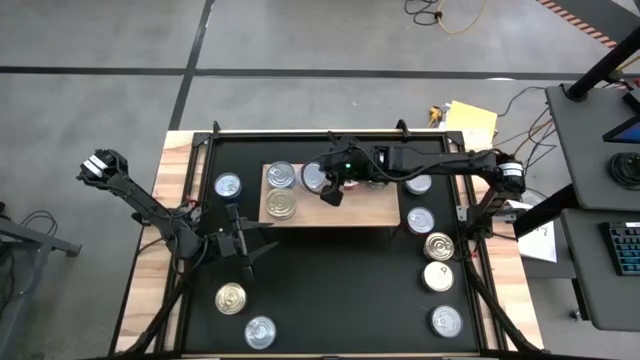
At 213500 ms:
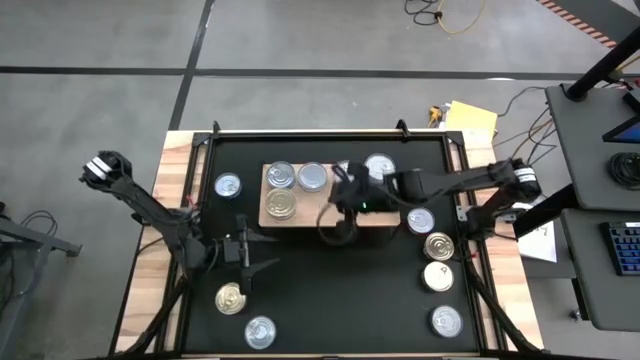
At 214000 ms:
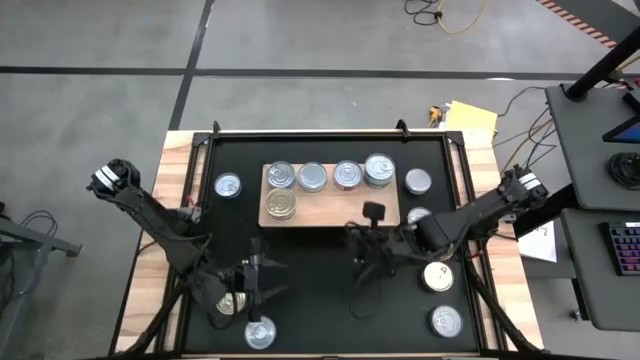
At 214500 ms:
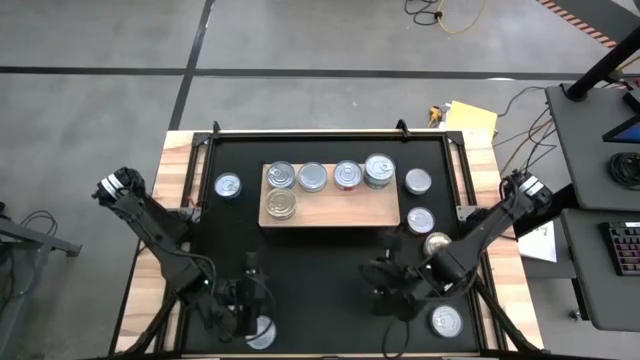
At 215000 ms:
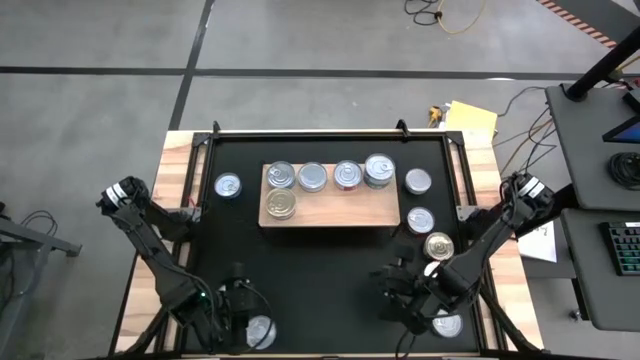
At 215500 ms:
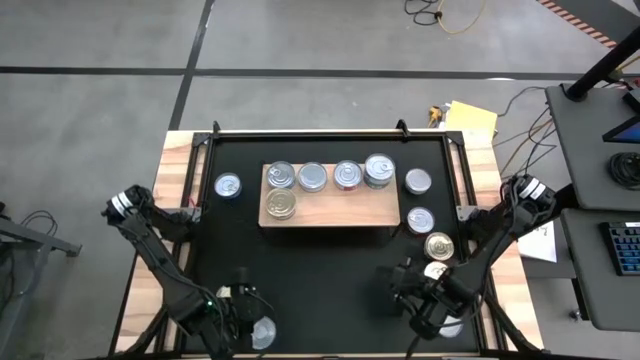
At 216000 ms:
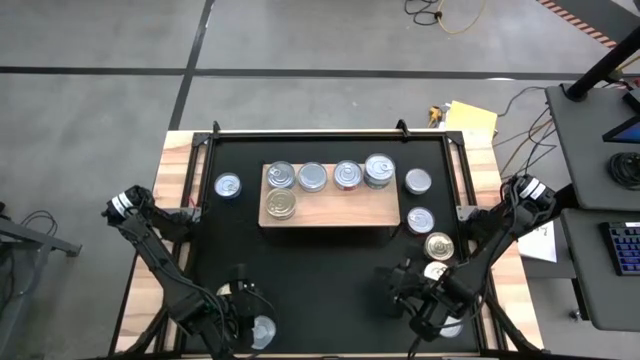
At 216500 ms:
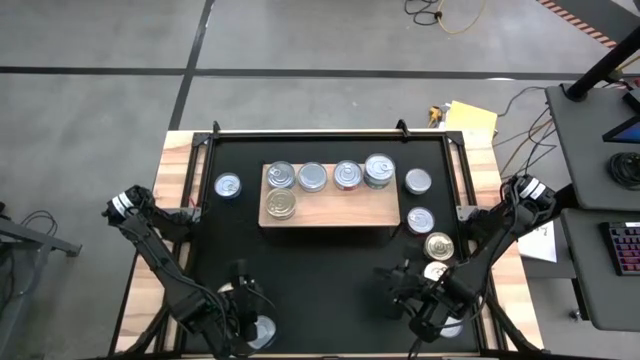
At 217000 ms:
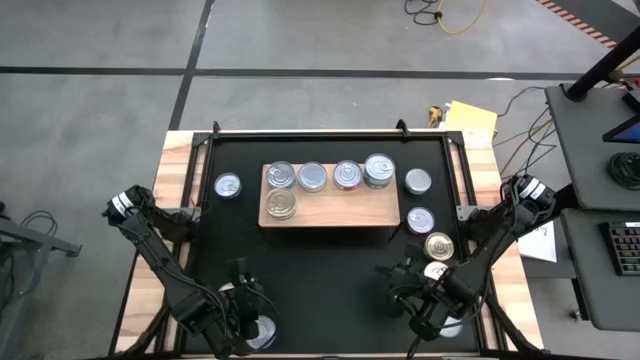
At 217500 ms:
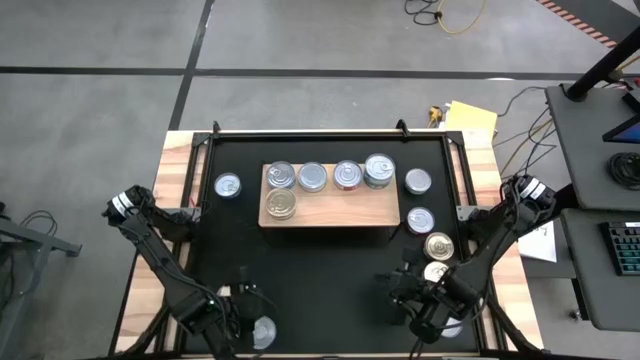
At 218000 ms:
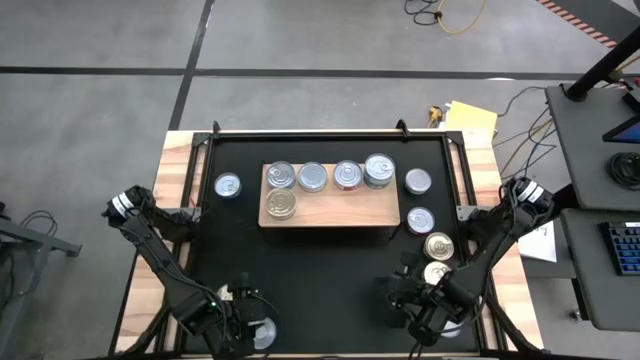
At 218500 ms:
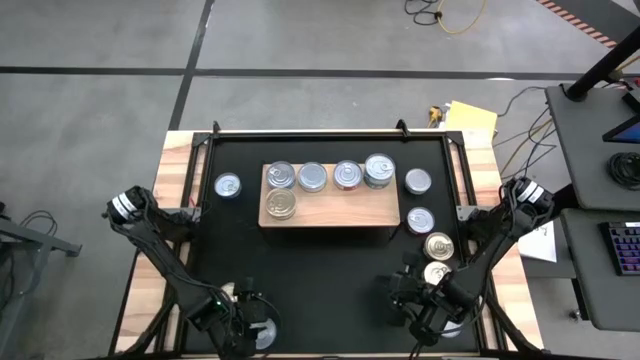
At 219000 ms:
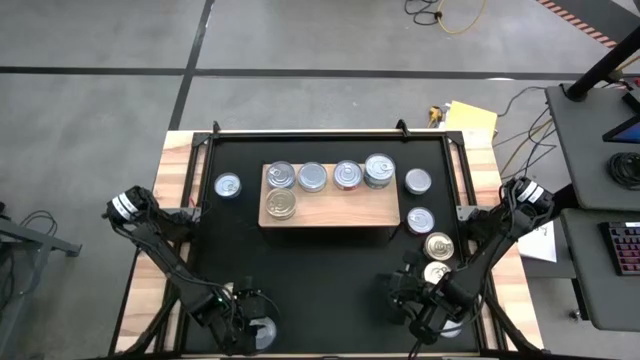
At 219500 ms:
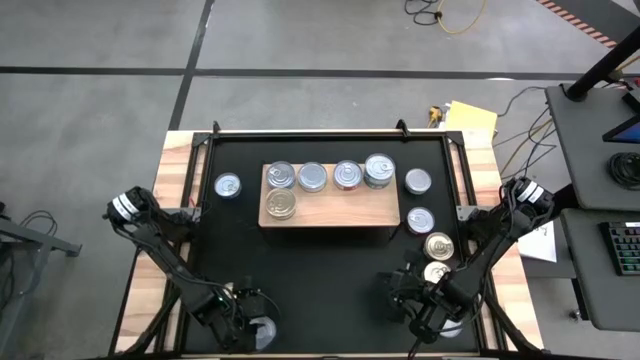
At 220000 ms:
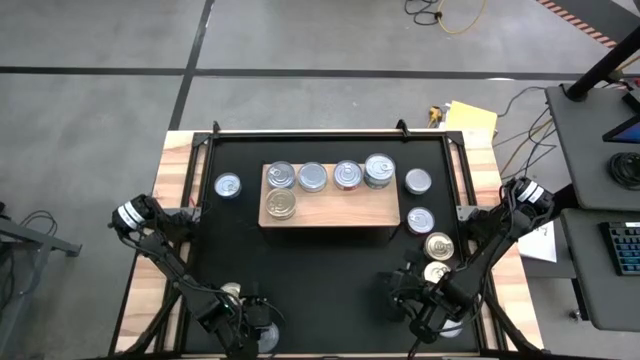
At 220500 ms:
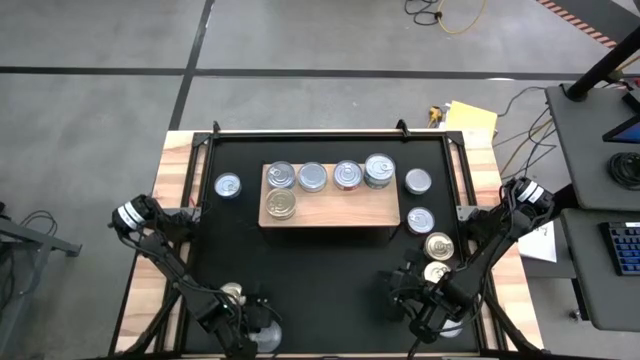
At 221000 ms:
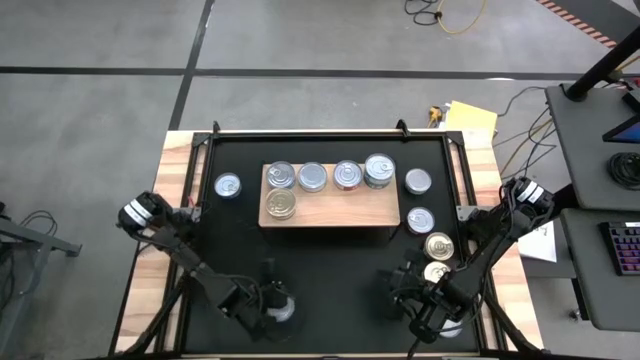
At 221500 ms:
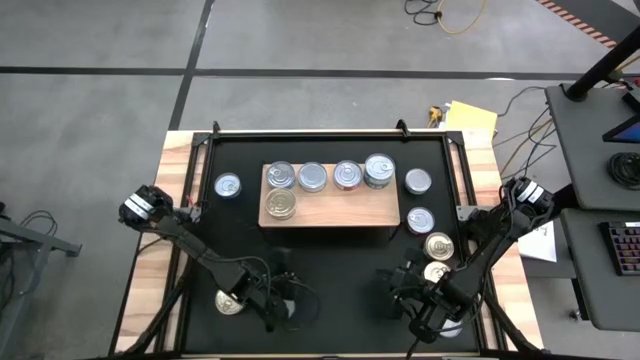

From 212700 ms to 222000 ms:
Task: Stack canned seafood by type on shelf
Put the green tuna can on the shelf

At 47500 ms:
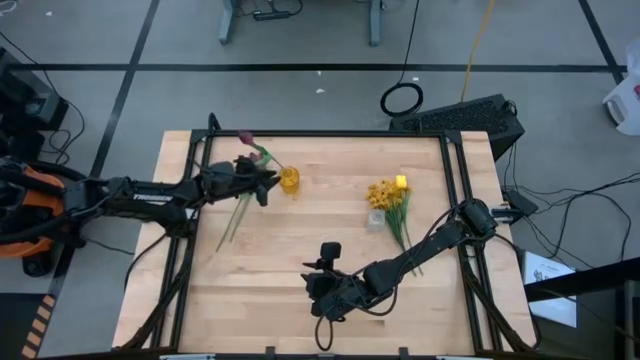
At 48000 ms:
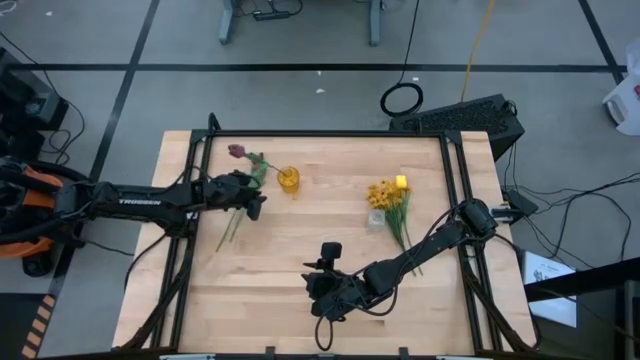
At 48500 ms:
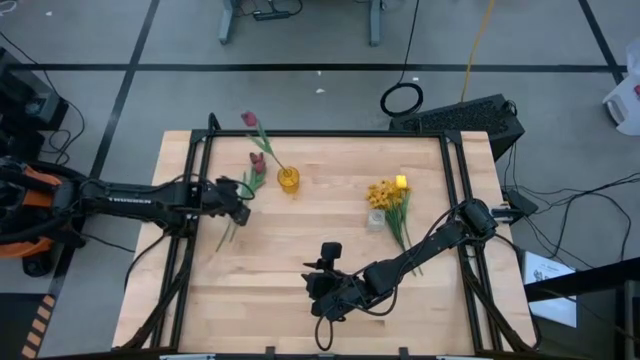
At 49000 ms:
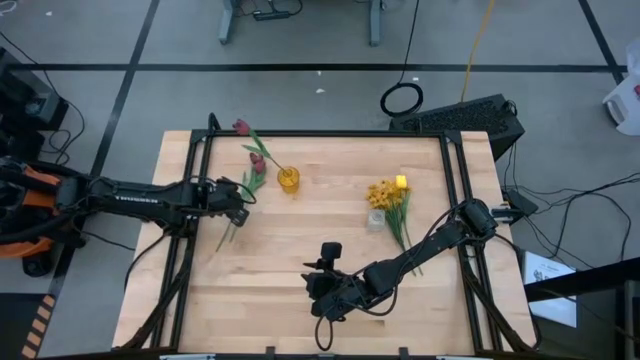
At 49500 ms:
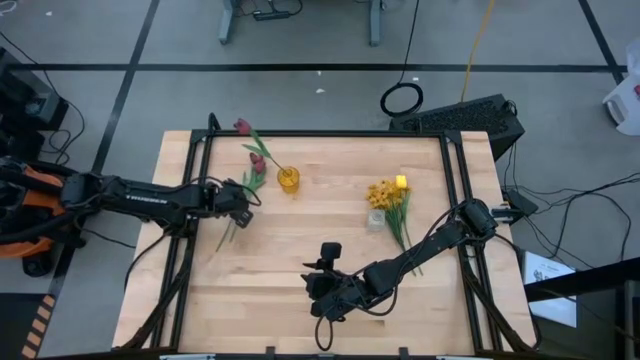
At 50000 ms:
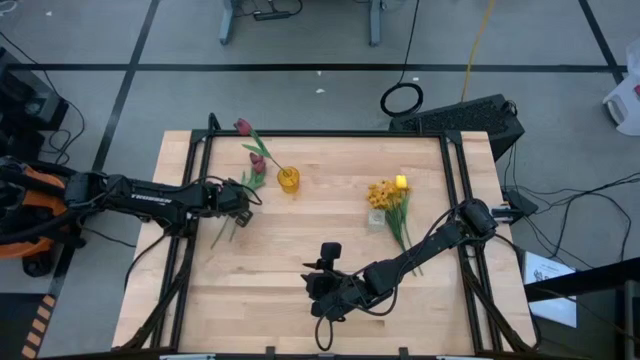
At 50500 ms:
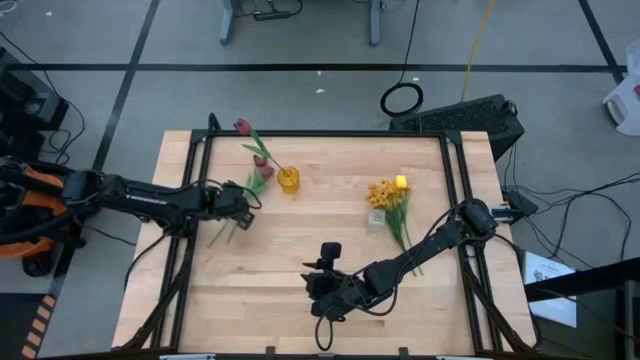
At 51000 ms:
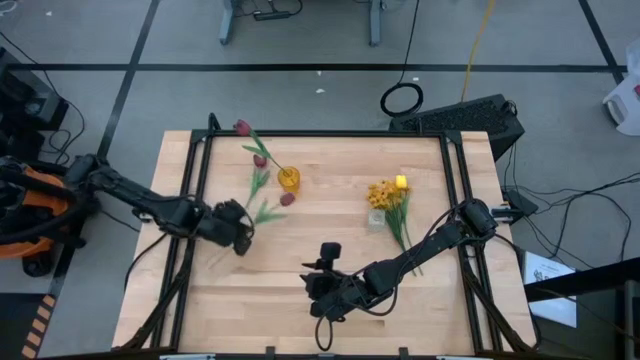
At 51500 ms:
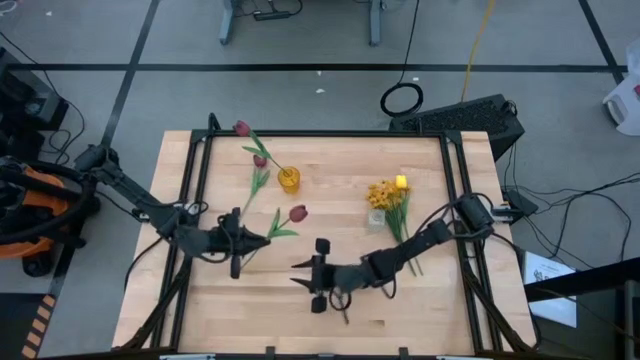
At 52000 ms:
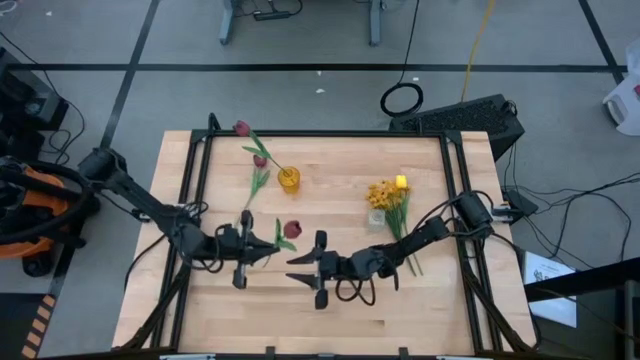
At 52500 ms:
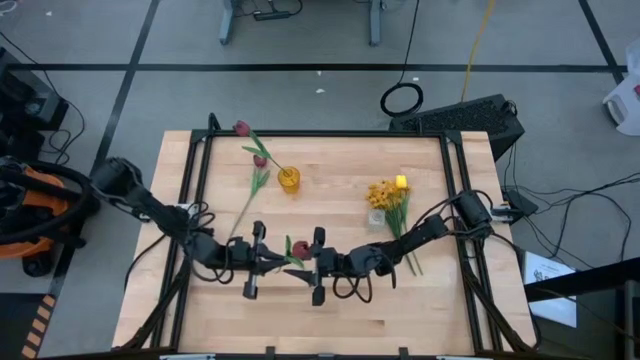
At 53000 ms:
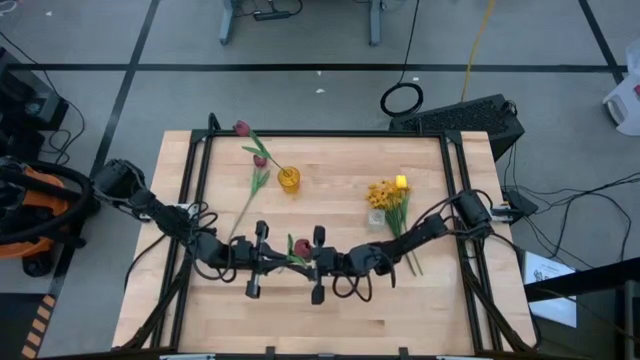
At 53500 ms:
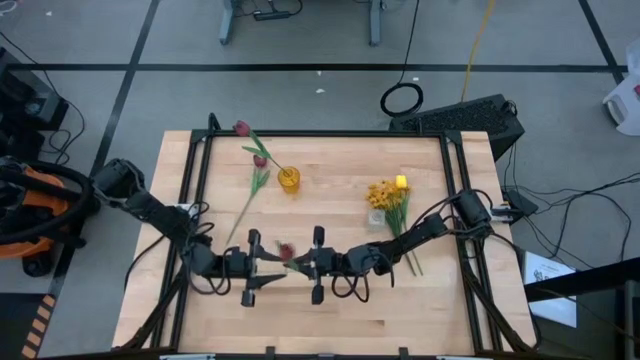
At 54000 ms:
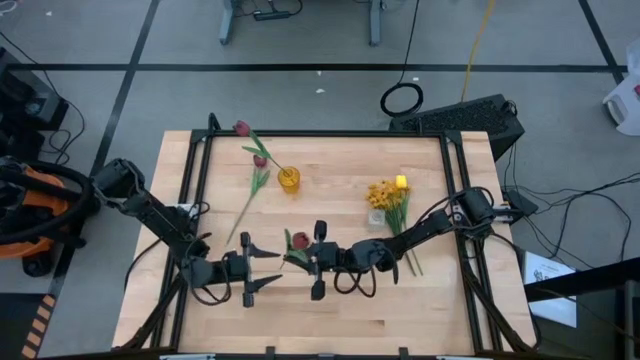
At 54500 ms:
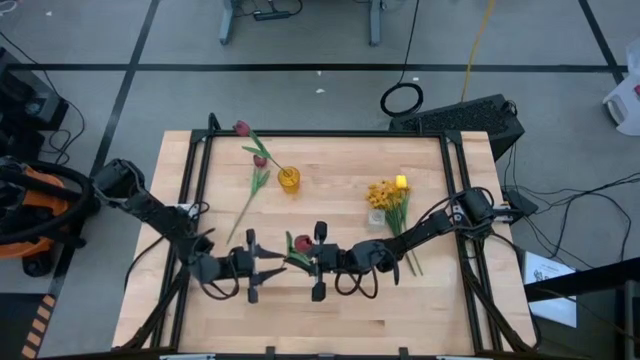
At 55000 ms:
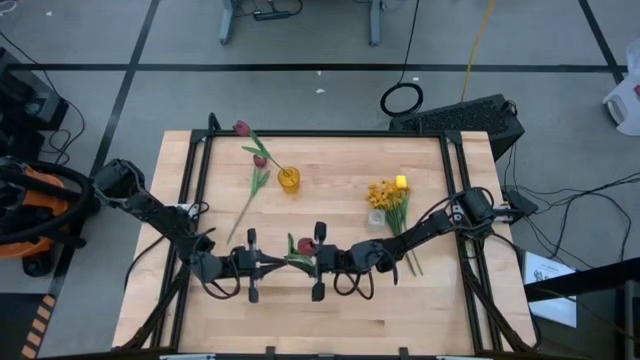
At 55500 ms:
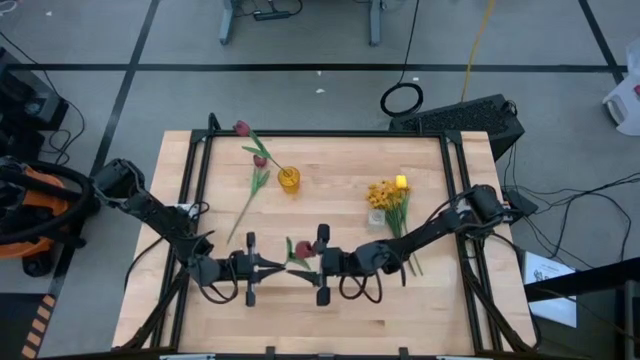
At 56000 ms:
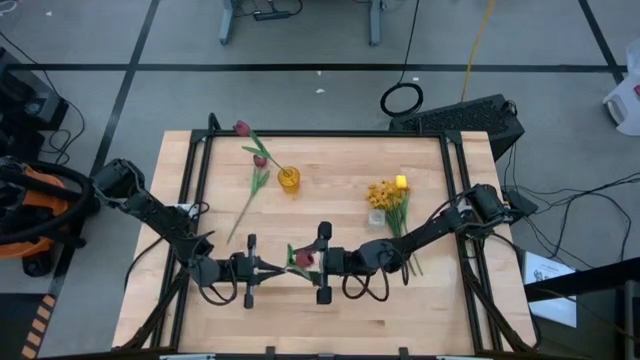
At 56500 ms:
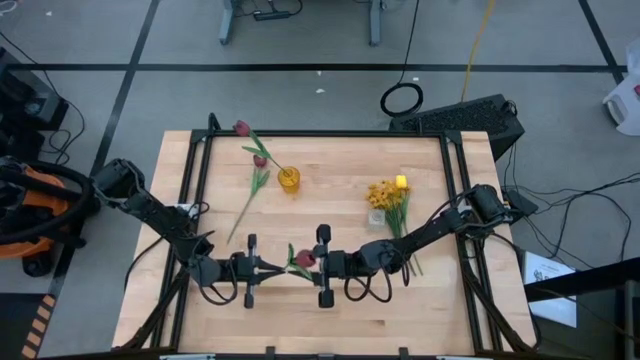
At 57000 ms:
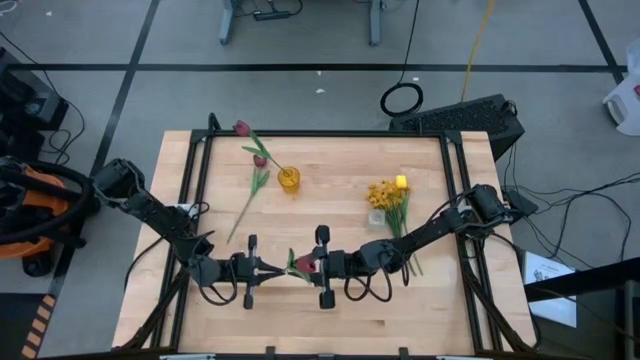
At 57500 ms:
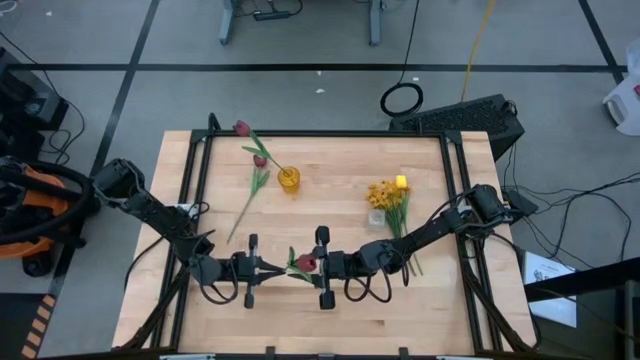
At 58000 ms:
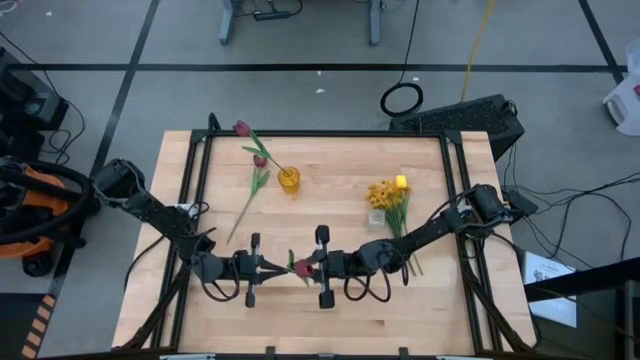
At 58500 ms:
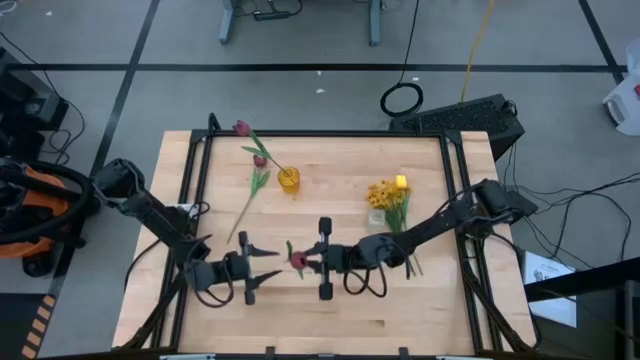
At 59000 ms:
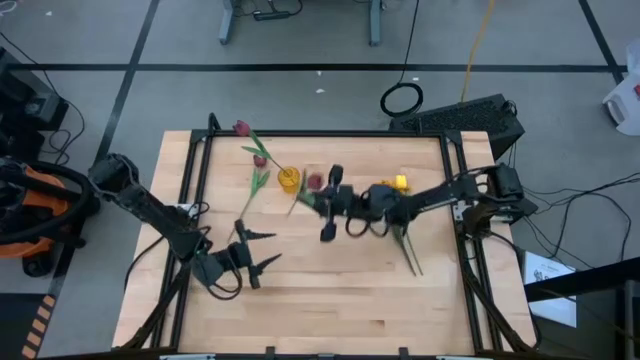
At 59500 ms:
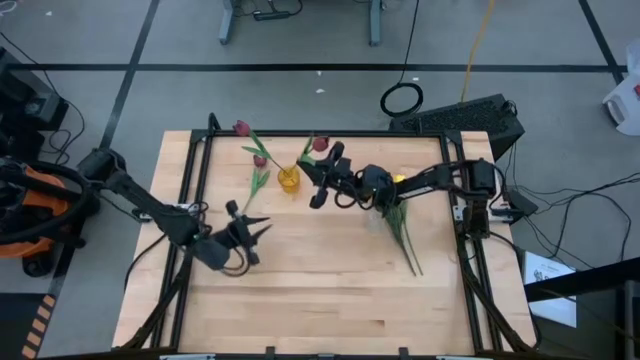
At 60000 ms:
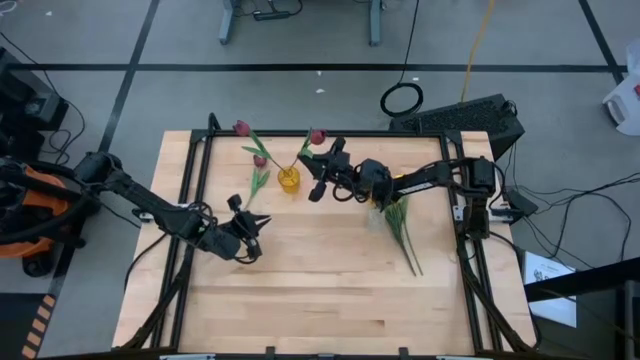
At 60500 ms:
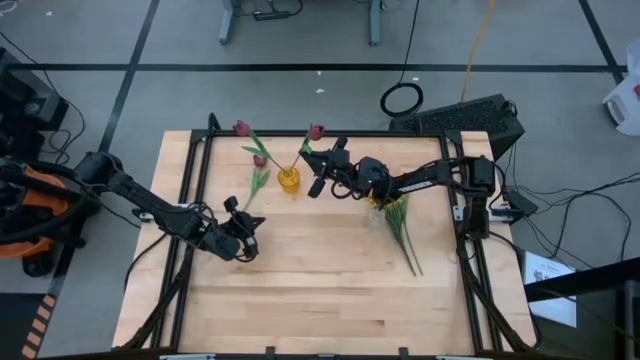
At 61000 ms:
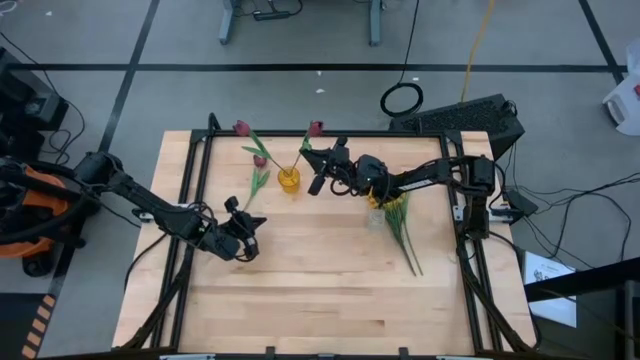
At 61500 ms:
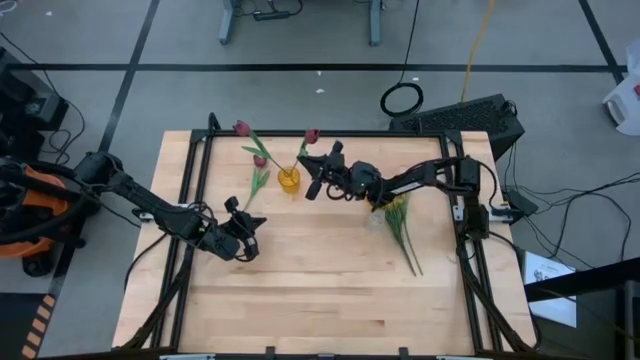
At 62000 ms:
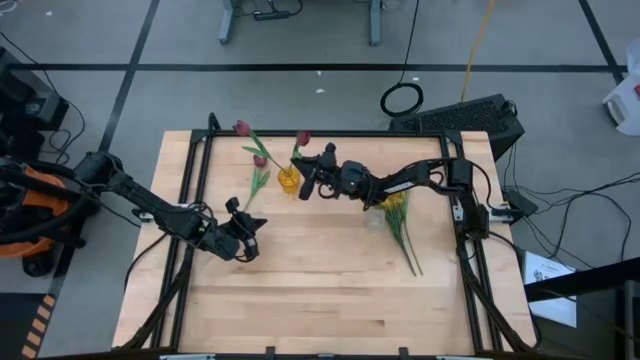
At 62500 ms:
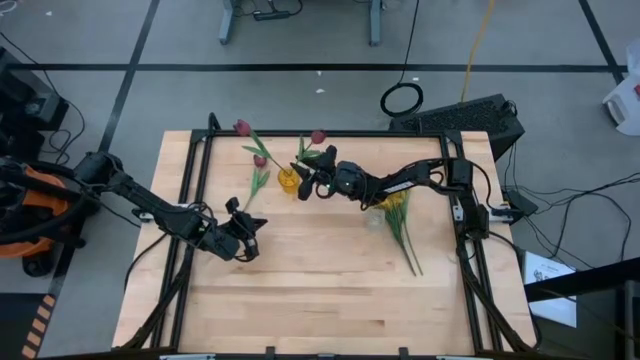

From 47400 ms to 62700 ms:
Task: Sort flowers into vase by color
Put the red flower into the yellow vase
